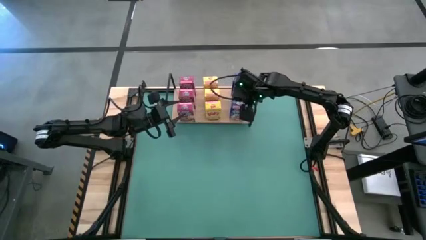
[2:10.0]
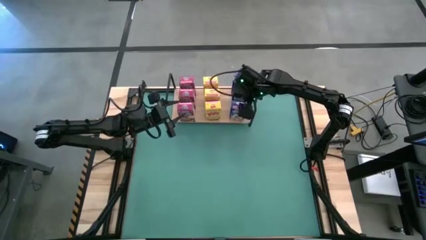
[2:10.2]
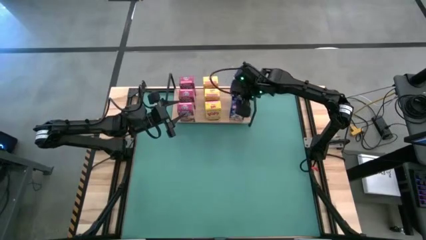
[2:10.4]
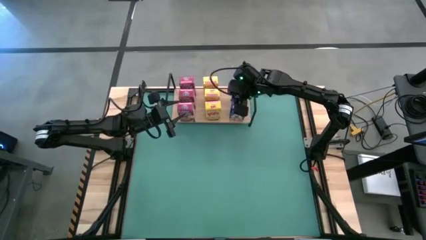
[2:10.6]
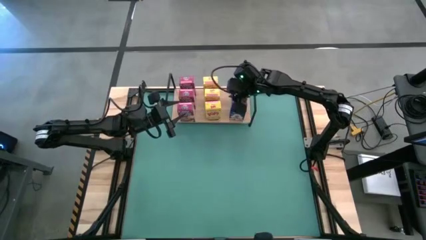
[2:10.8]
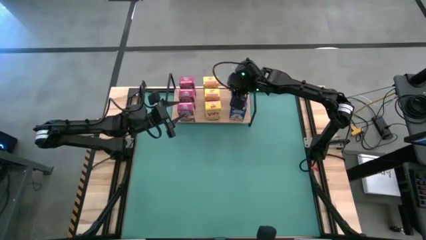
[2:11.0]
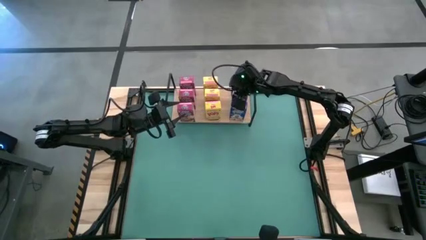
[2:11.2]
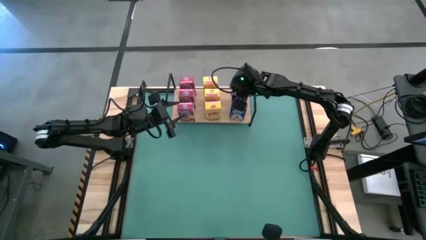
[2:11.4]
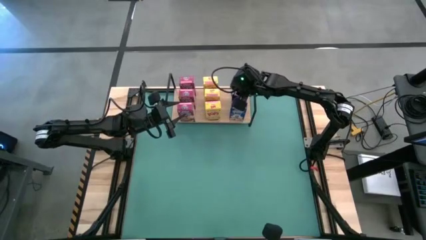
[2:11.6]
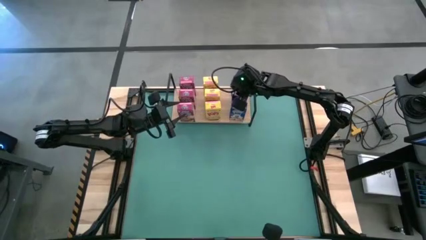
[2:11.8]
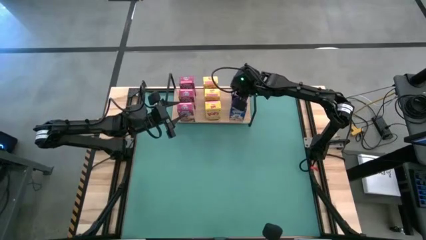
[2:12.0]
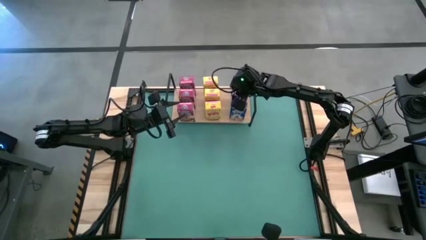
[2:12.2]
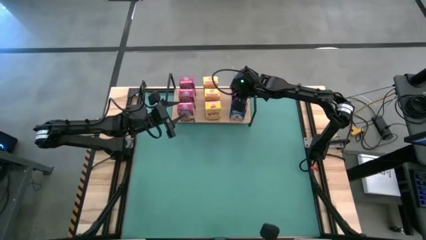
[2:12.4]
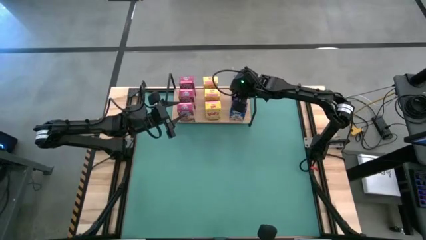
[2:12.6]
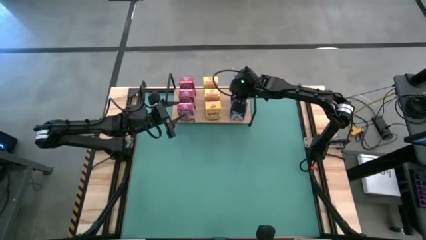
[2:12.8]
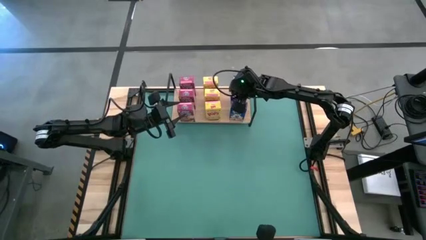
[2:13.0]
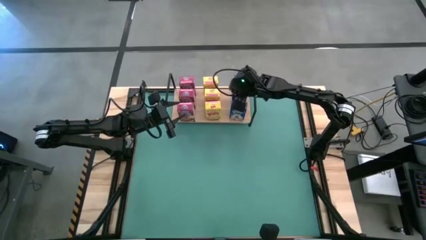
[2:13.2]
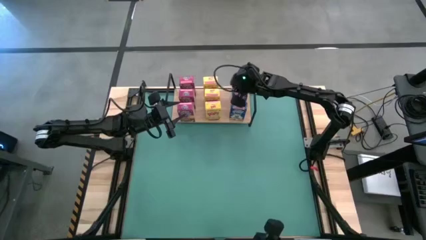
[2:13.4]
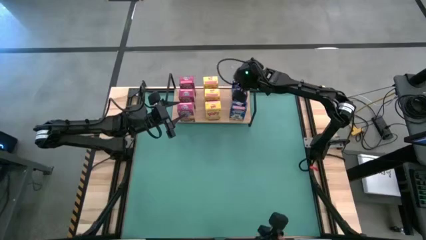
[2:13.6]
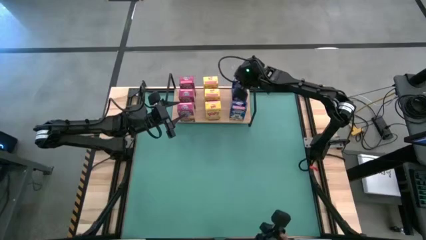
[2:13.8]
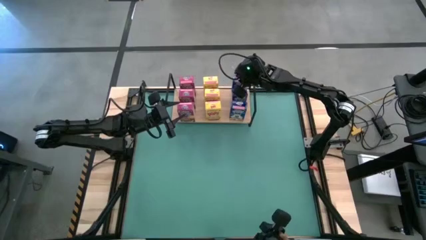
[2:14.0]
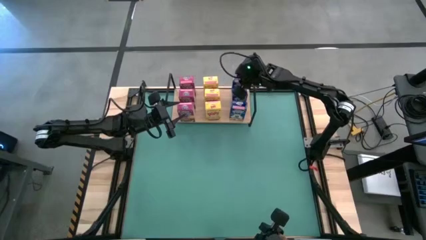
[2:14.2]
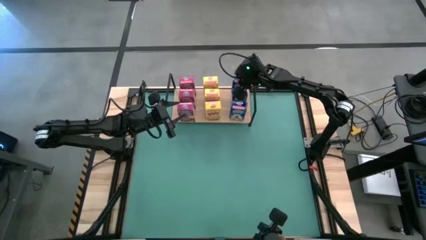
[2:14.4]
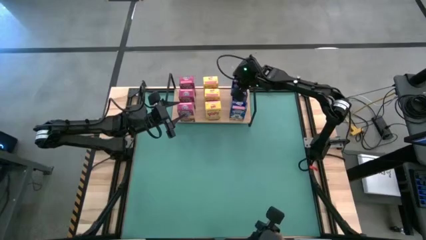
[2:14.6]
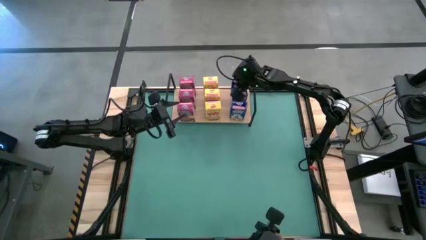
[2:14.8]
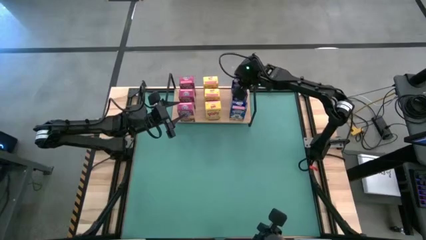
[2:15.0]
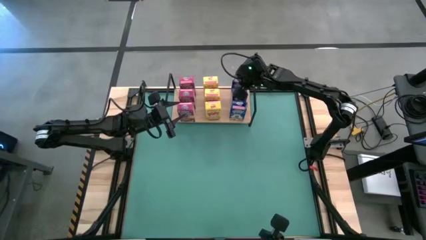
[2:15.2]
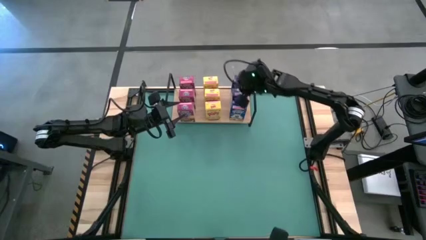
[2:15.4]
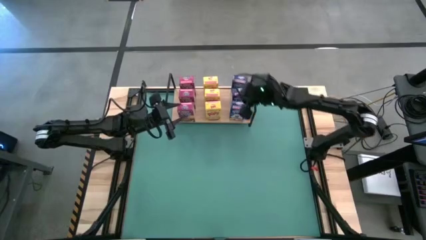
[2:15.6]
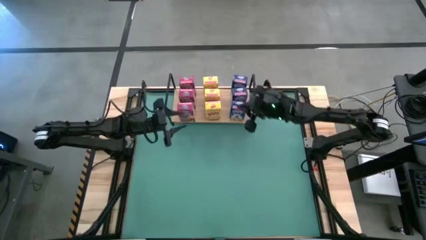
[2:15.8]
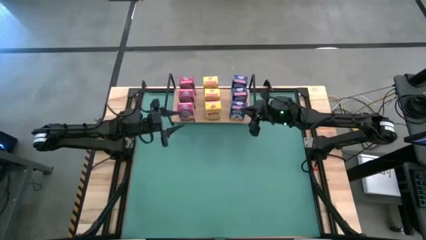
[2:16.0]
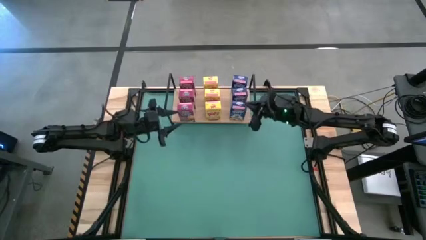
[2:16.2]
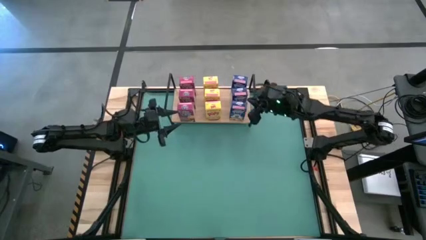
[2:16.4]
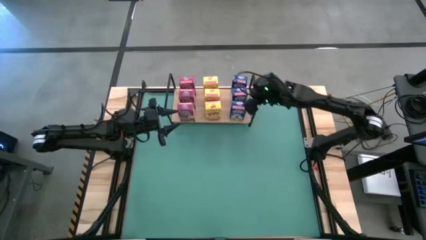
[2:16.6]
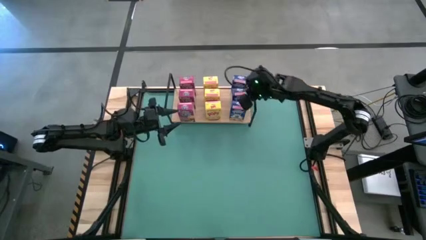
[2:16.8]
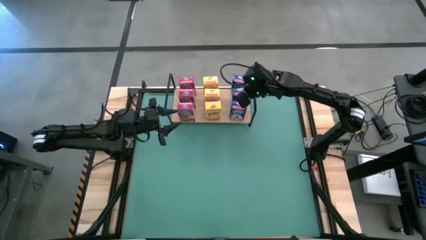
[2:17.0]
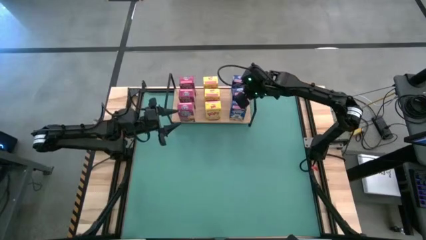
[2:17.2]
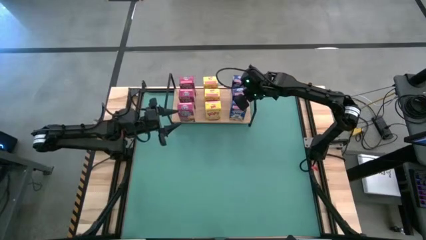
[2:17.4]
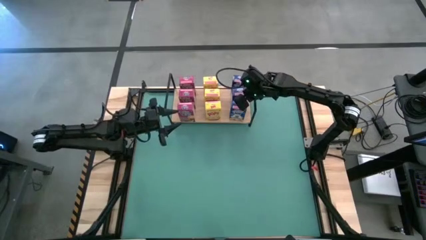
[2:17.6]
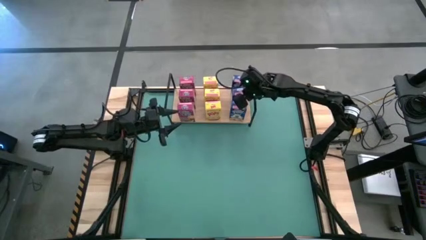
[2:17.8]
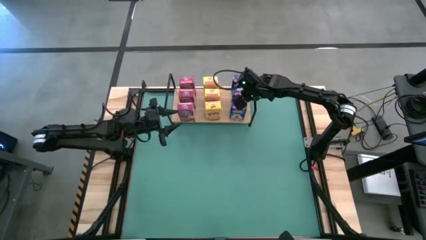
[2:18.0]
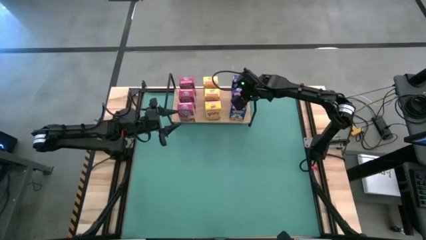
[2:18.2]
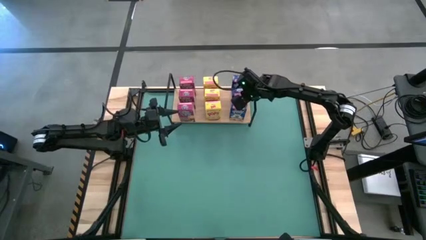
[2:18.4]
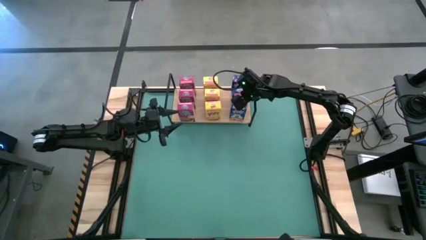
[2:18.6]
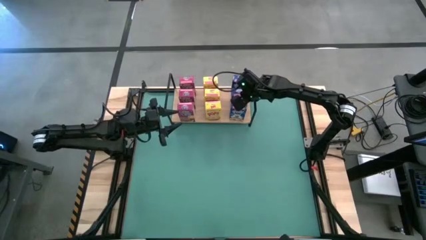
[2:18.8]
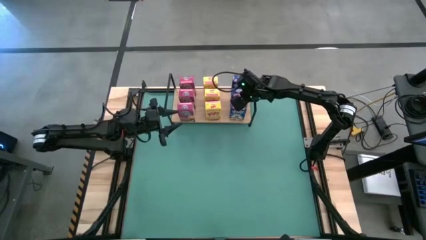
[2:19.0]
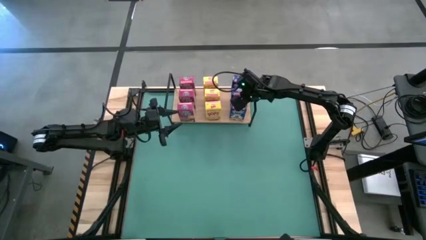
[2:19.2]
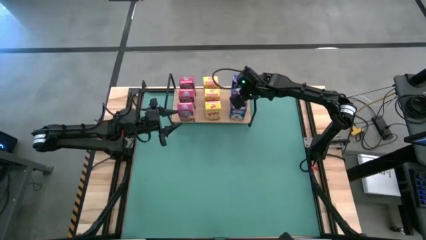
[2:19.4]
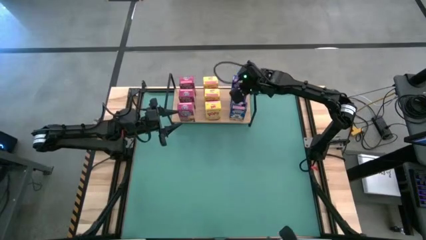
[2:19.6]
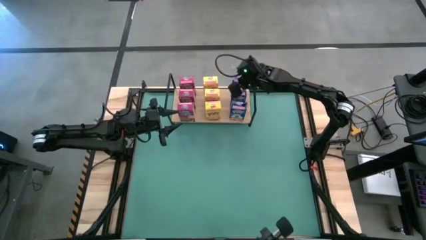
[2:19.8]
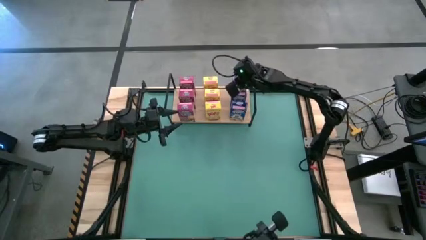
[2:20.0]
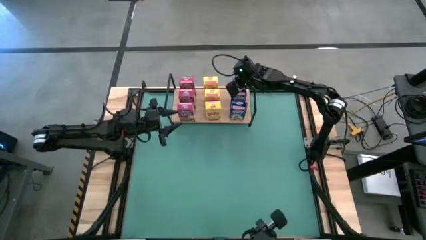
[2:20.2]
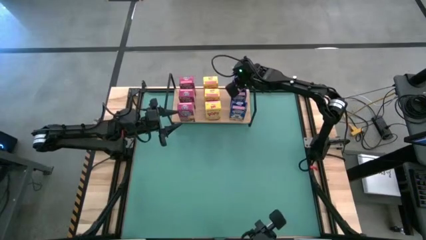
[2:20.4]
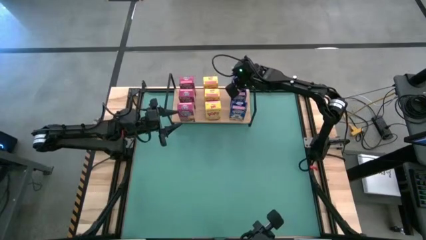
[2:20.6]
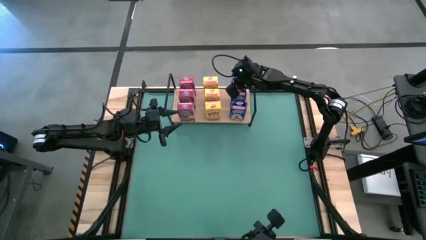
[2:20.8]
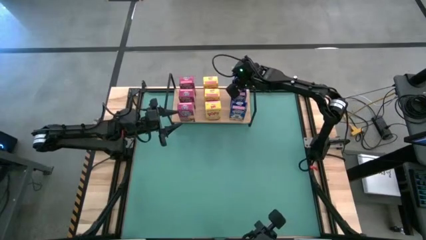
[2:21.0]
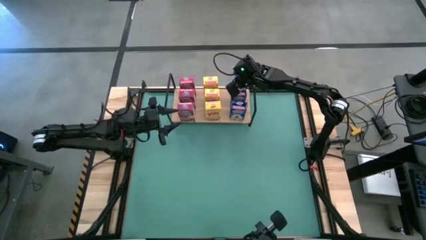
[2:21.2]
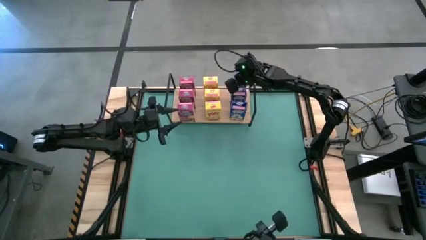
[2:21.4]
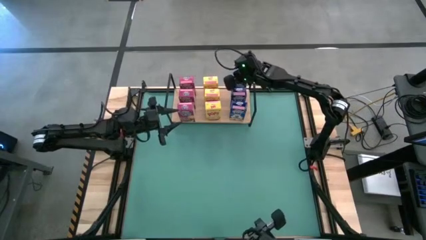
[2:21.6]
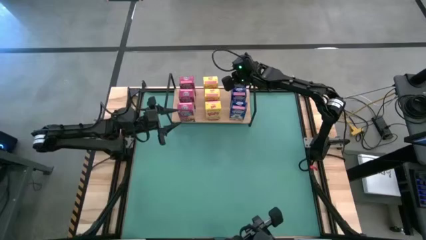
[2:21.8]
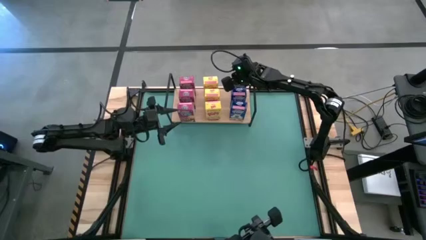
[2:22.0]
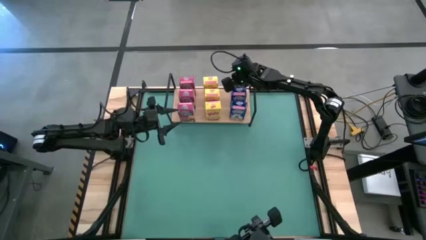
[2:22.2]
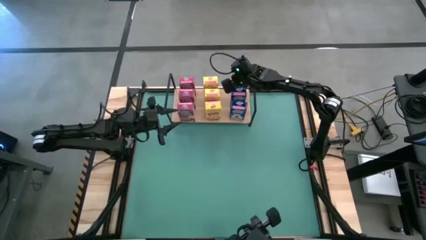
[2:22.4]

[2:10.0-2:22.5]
Task: Stack cereal on shelf
Adjust the blue cereal boxes on the shelf
